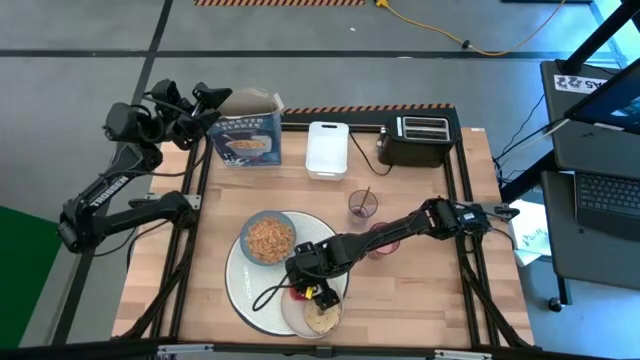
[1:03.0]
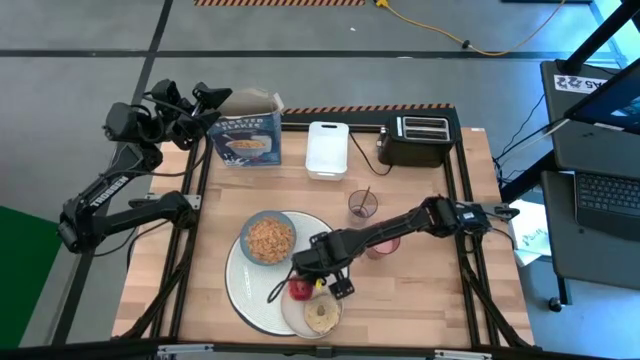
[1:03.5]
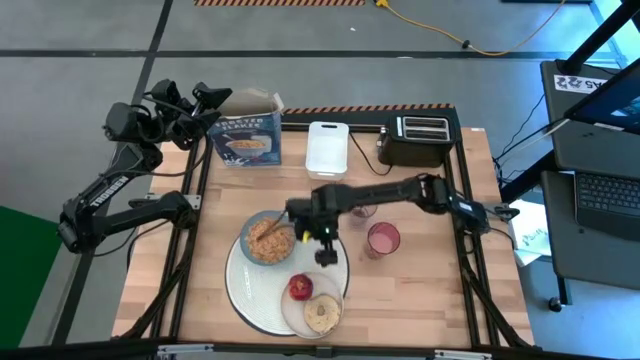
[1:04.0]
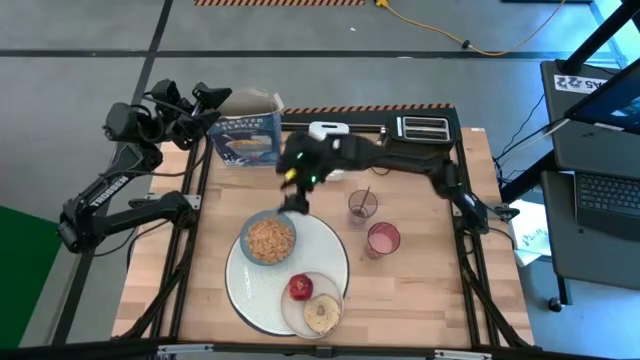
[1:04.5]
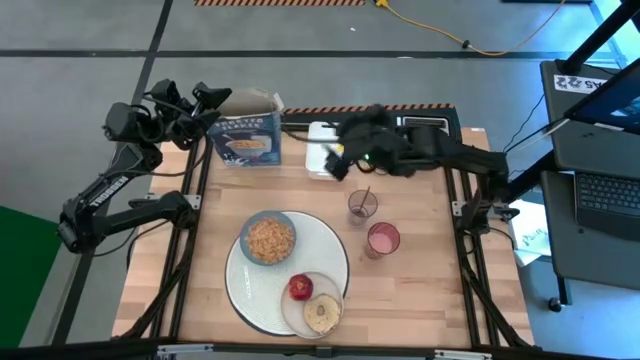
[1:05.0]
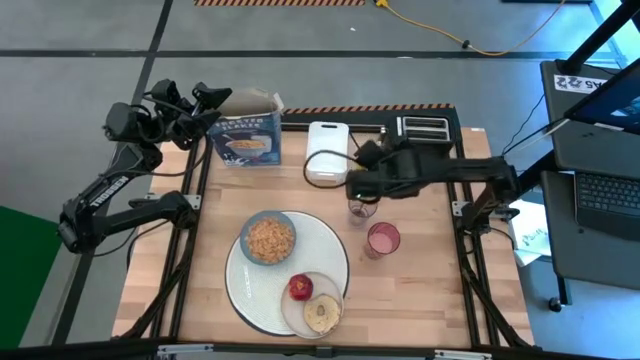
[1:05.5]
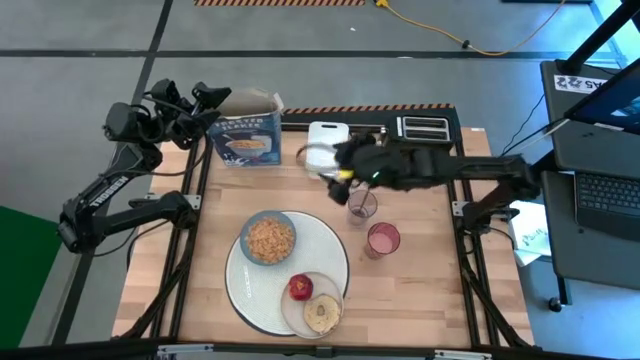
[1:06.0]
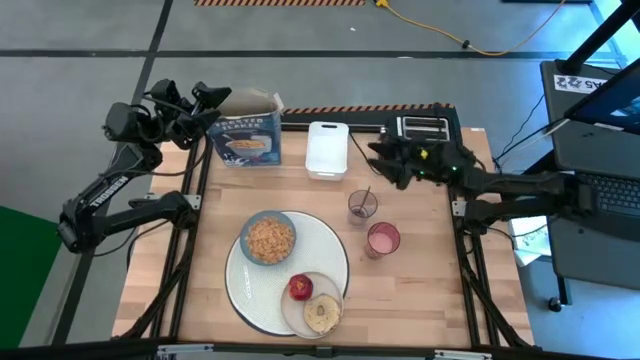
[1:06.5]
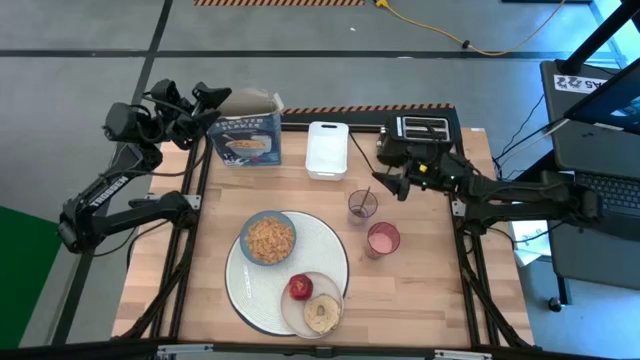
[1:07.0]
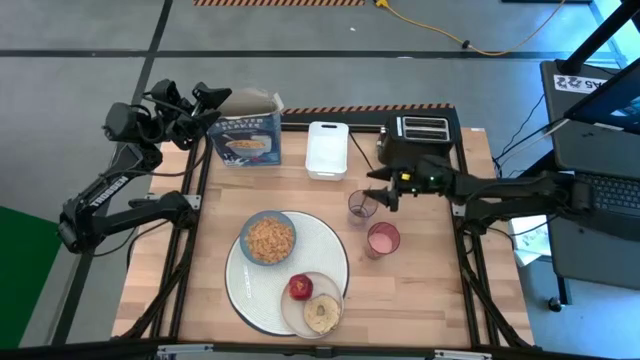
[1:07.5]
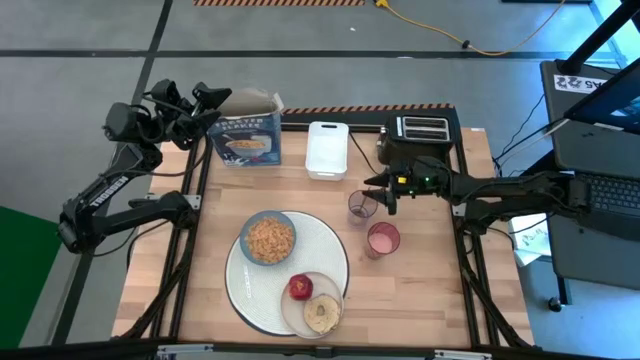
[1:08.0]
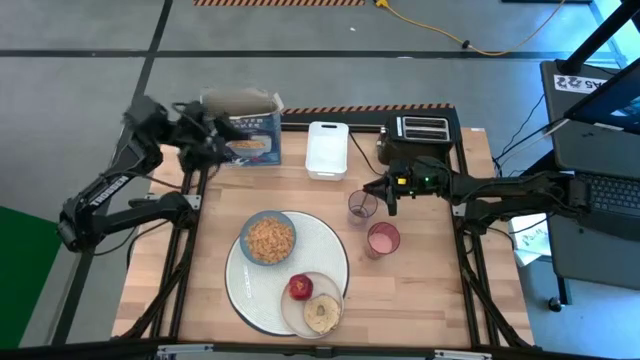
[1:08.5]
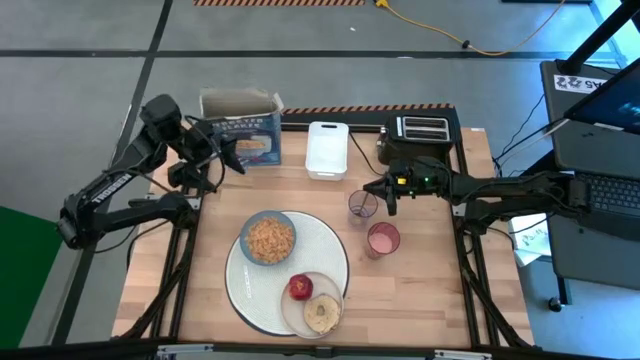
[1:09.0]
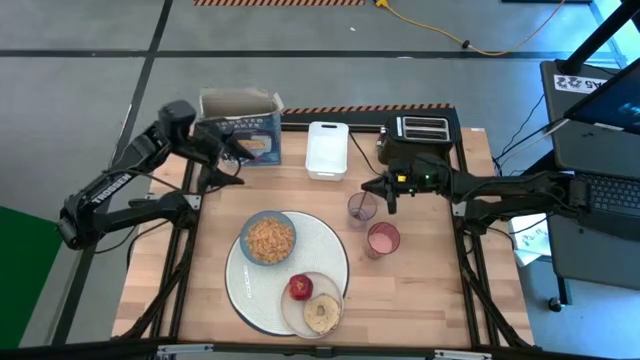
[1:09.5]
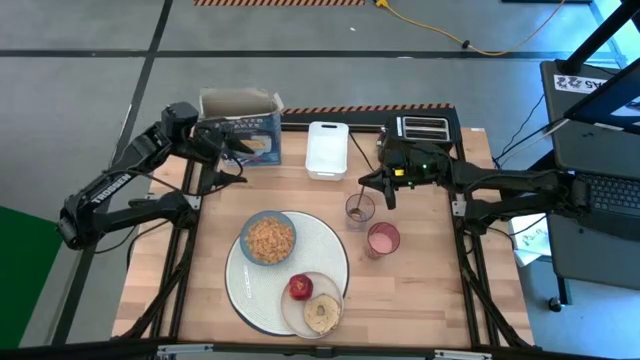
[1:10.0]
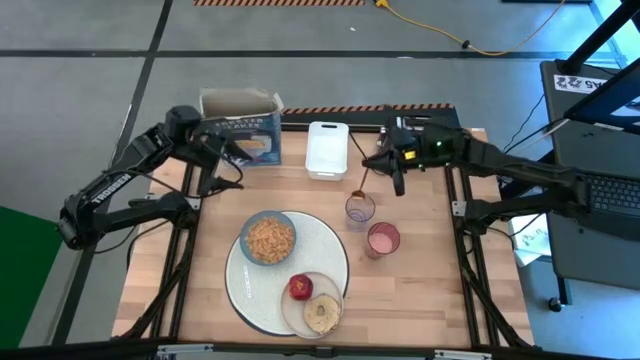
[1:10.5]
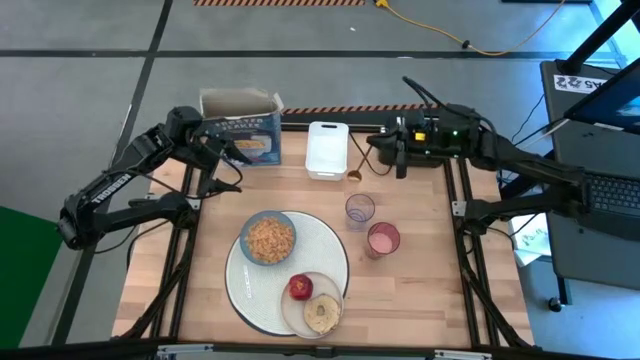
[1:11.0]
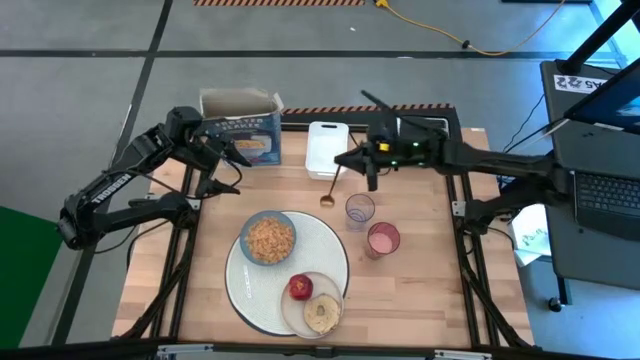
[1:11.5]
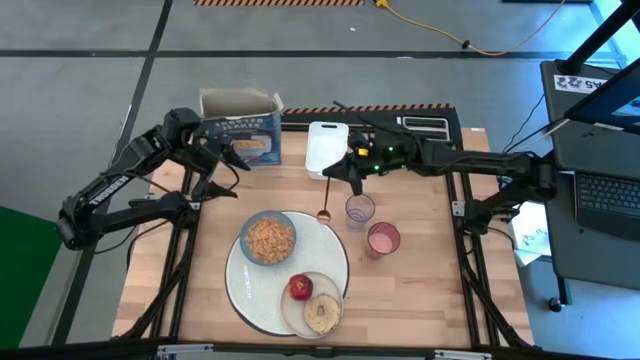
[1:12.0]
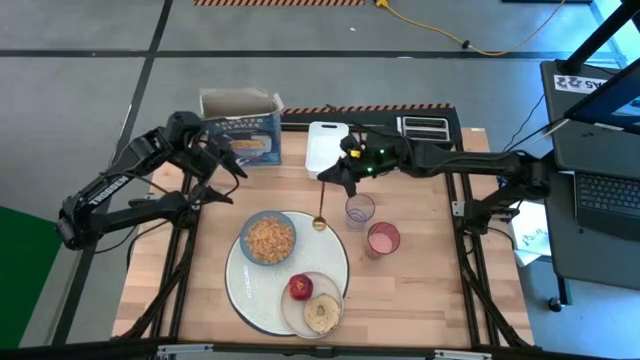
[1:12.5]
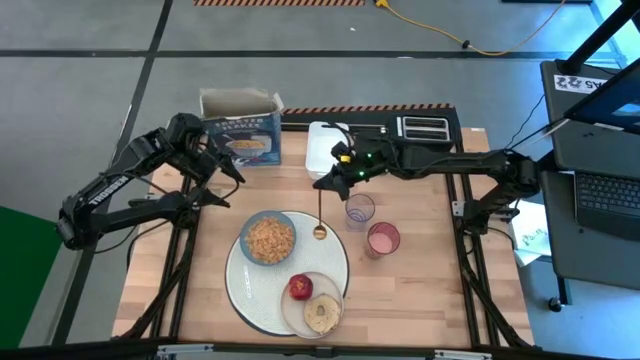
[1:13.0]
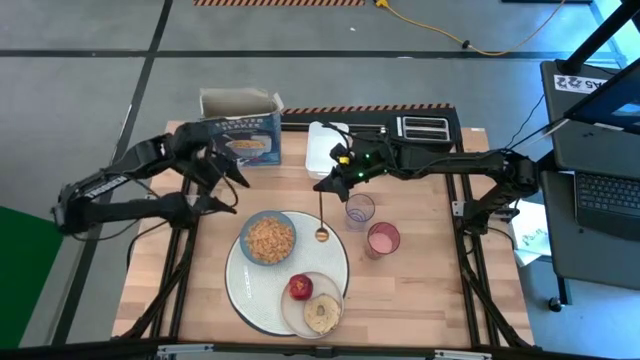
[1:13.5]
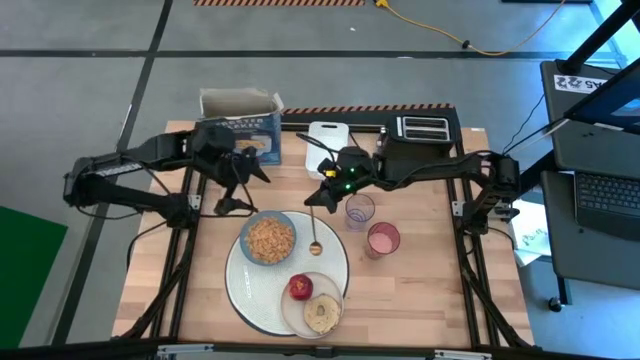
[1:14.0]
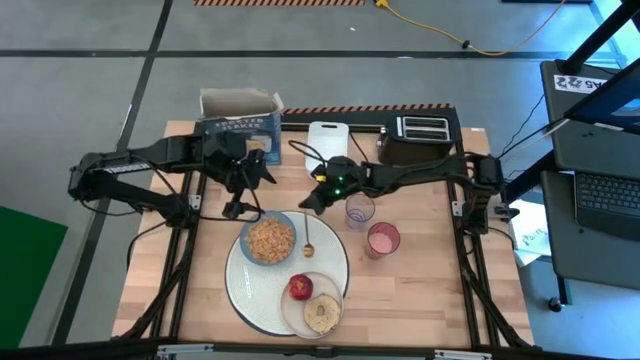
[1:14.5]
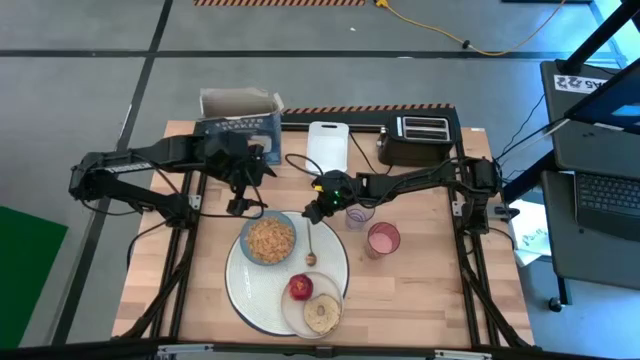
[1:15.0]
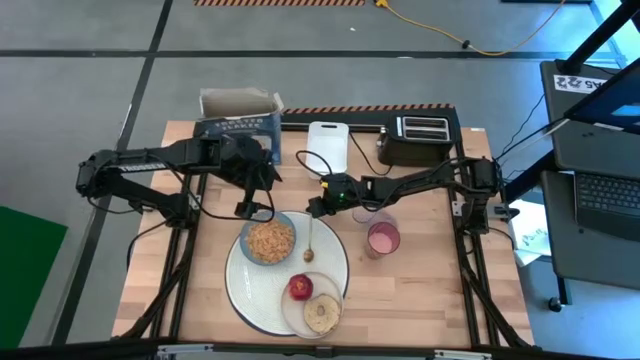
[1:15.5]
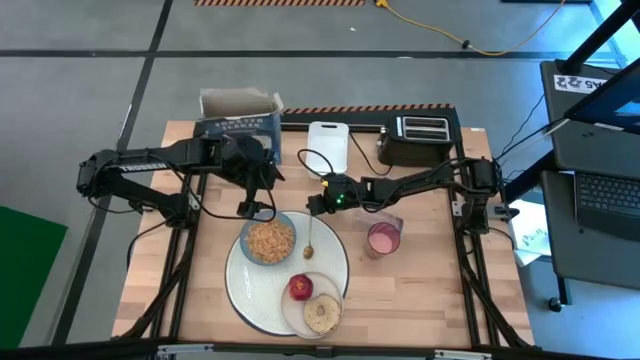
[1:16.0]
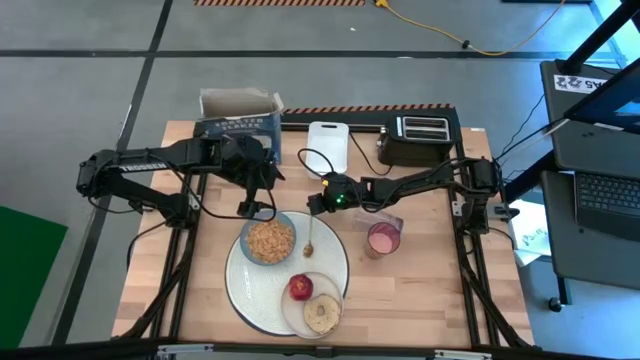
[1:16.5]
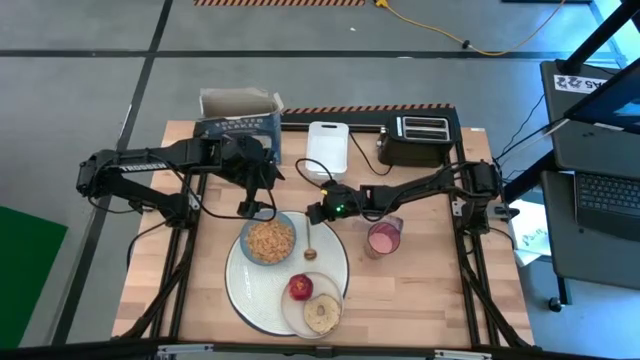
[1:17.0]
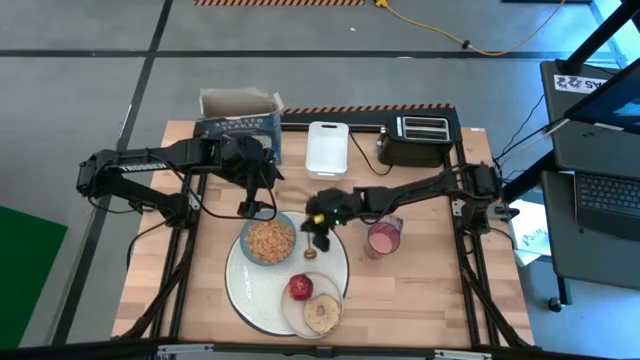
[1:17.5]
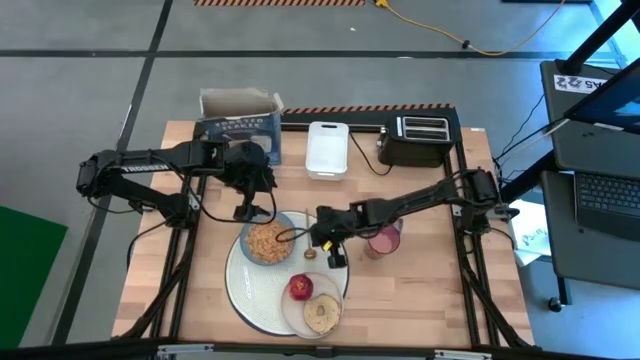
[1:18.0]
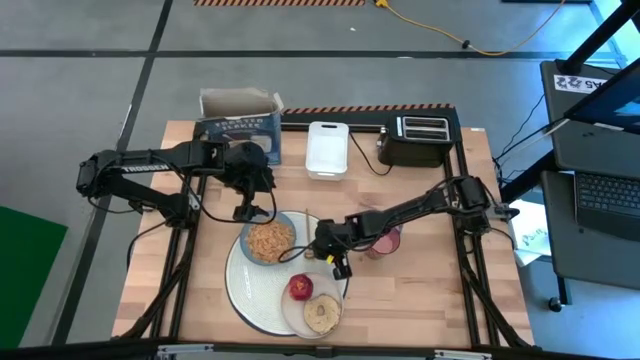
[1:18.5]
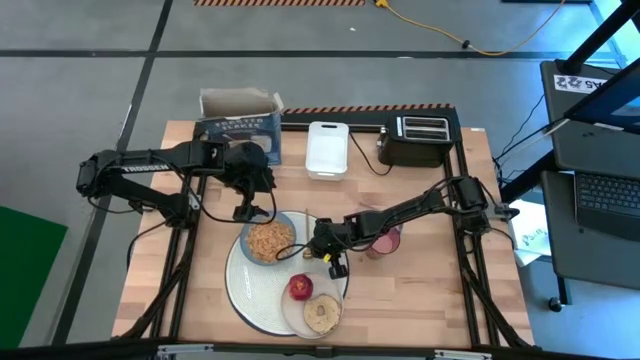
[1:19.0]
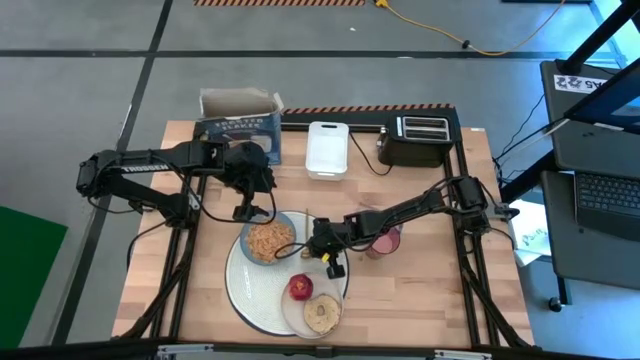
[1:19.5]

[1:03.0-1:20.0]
Task: Arrange a breakfast setting
Put the spoon to the white table mat

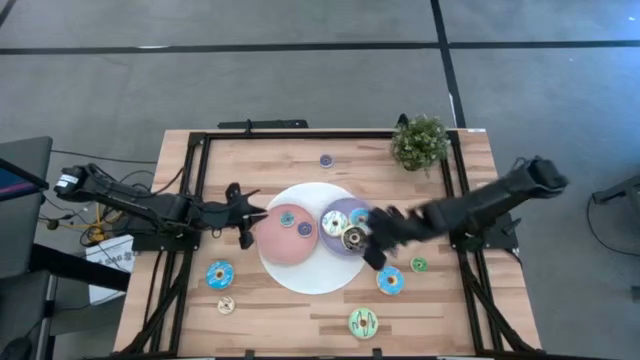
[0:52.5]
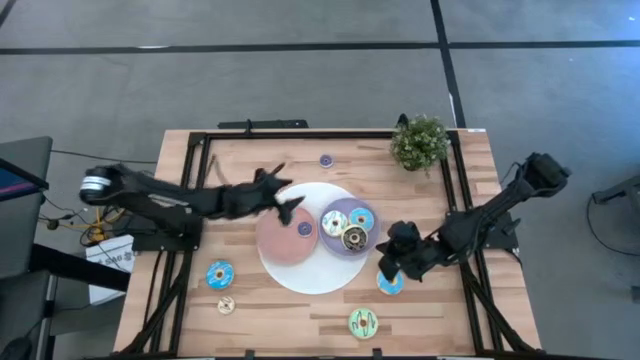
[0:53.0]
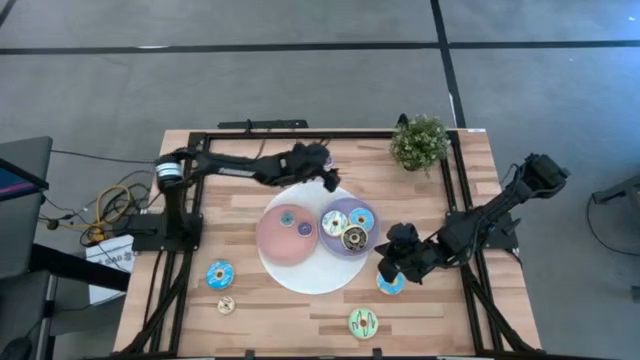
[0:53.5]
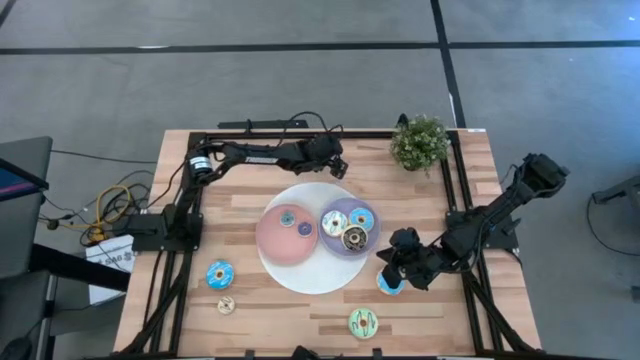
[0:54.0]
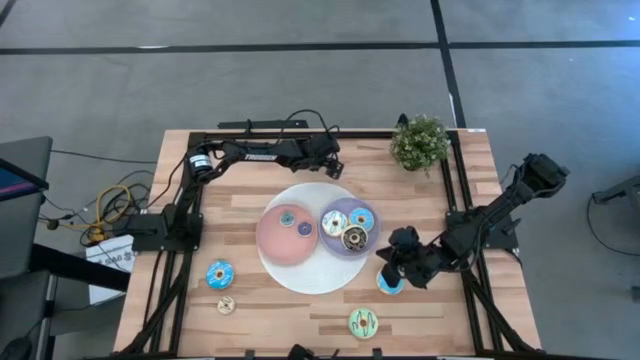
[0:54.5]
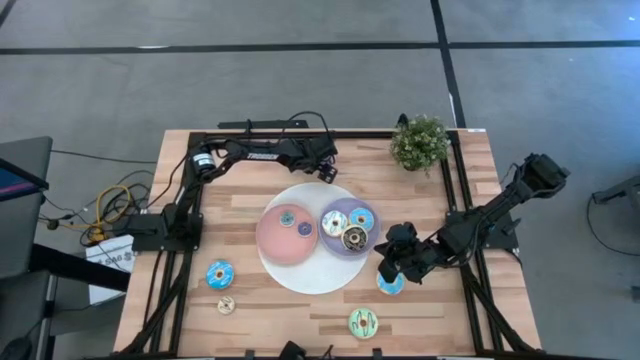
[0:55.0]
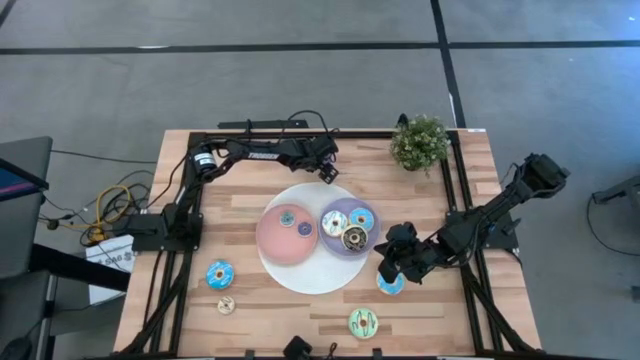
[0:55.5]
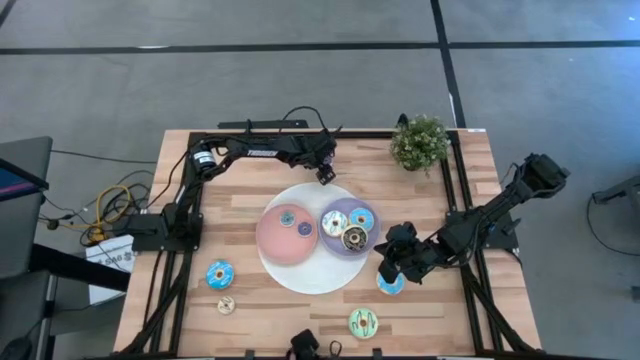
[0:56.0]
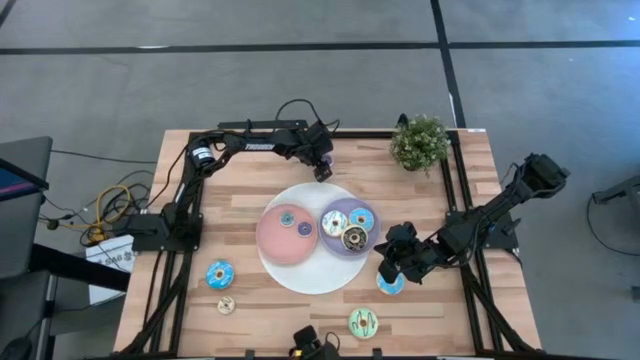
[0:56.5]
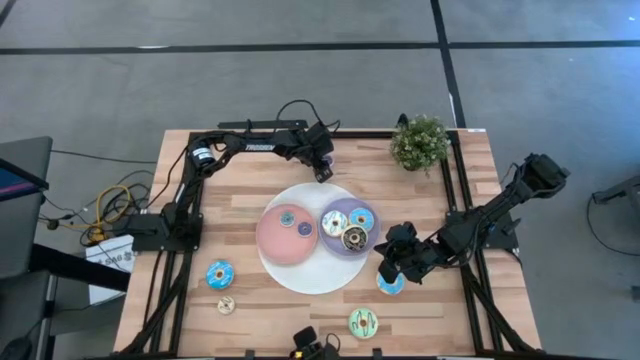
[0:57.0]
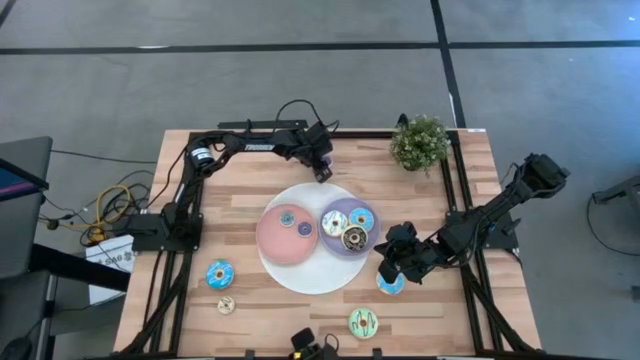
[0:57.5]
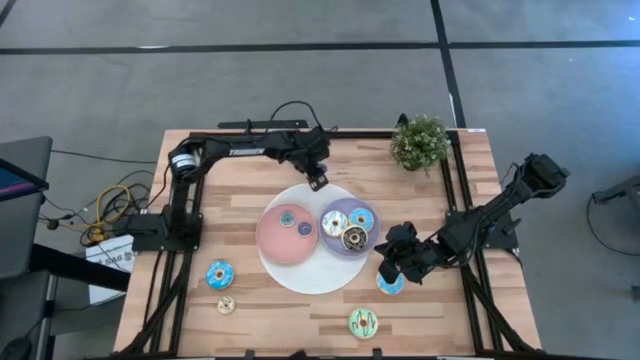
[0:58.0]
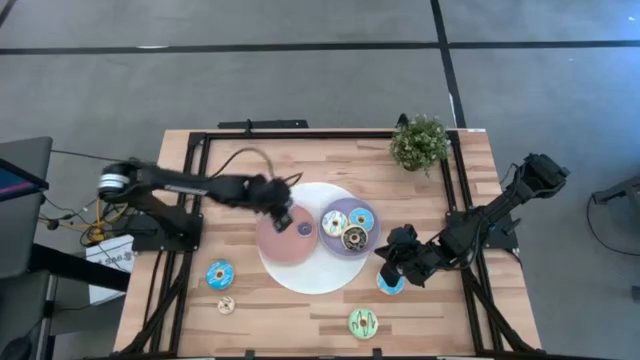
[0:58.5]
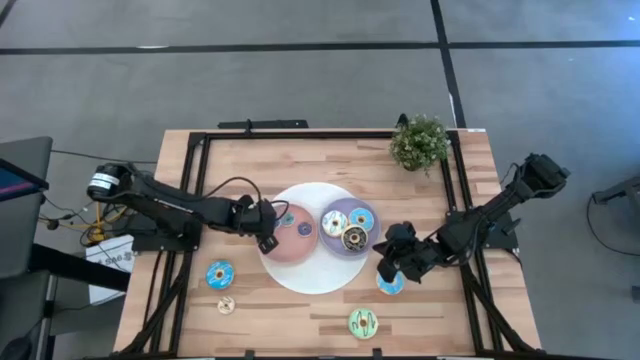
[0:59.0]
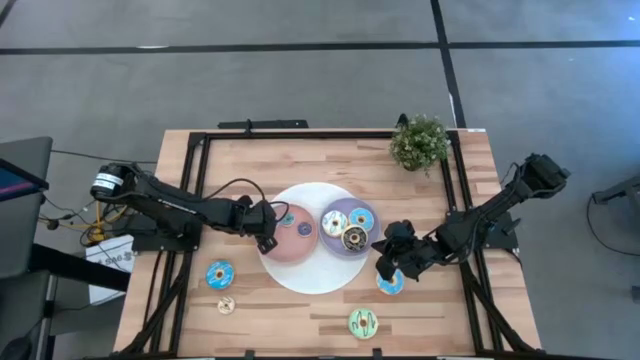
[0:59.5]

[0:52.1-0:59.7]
Task: Pick & Place donuts
Put the small violet donut on the pink plate
